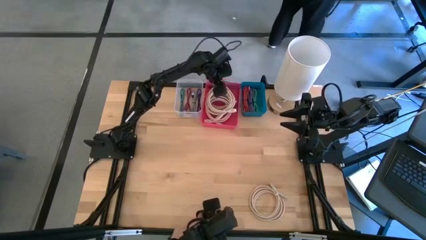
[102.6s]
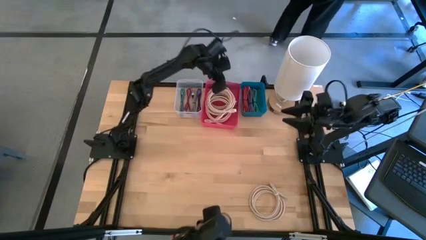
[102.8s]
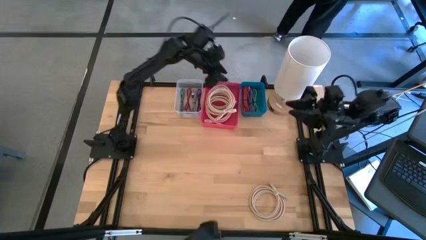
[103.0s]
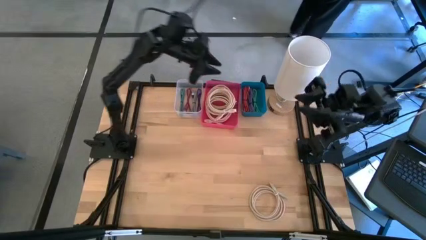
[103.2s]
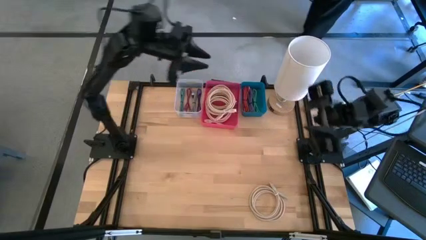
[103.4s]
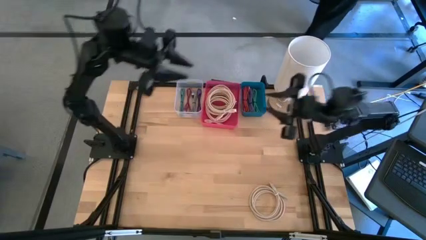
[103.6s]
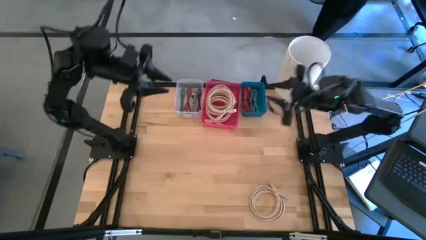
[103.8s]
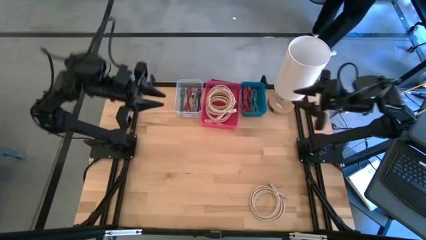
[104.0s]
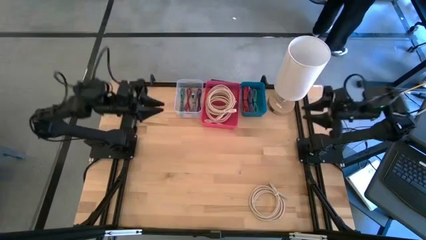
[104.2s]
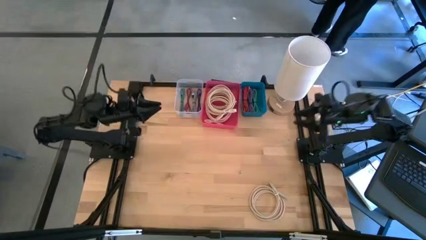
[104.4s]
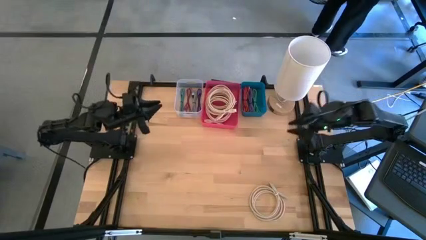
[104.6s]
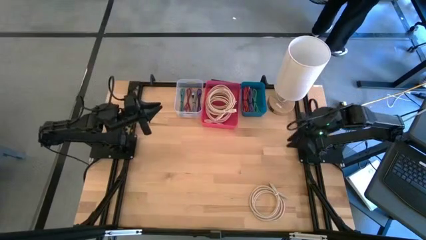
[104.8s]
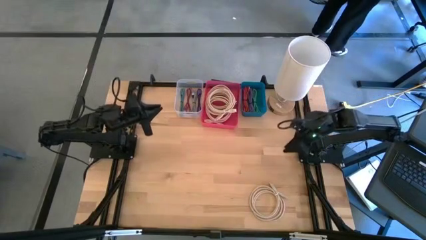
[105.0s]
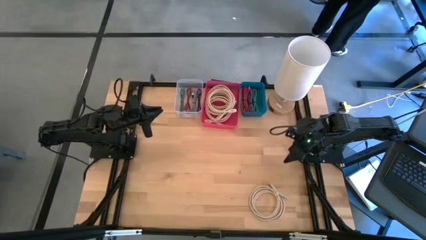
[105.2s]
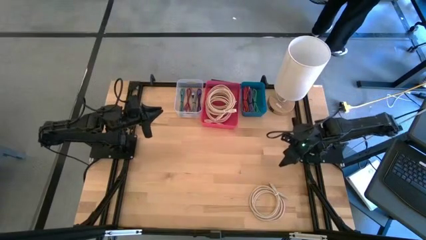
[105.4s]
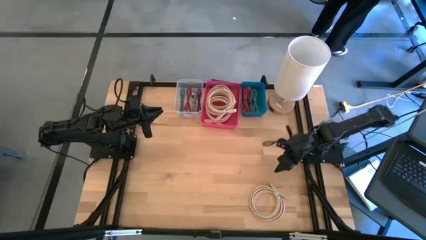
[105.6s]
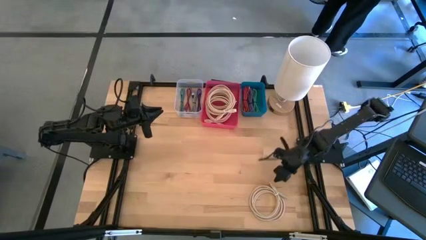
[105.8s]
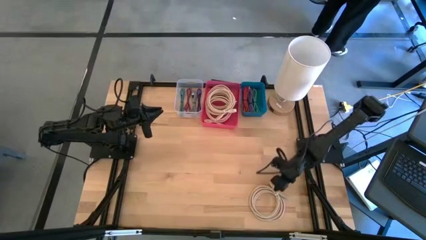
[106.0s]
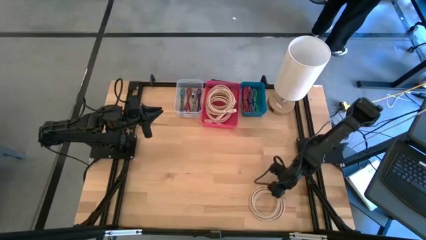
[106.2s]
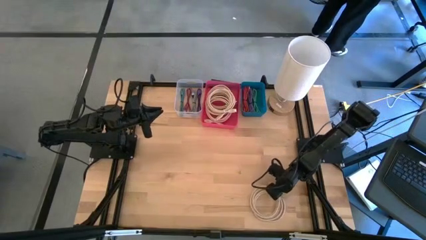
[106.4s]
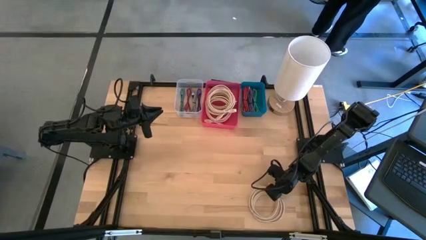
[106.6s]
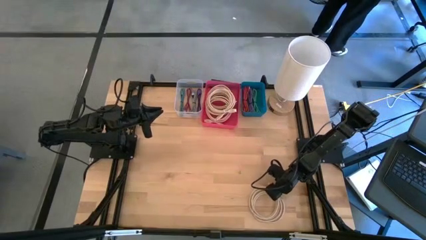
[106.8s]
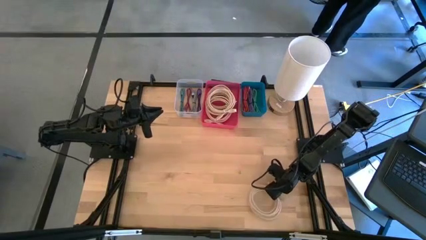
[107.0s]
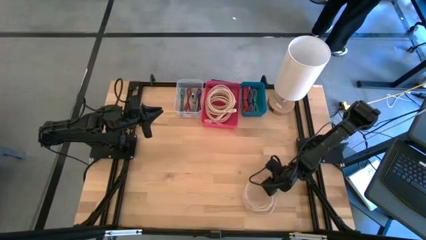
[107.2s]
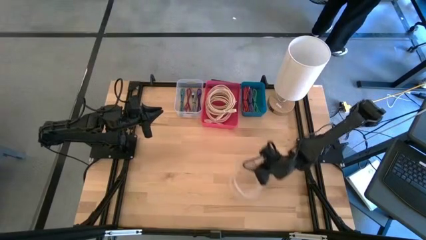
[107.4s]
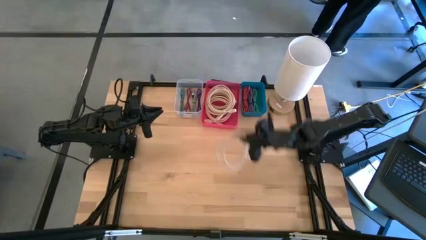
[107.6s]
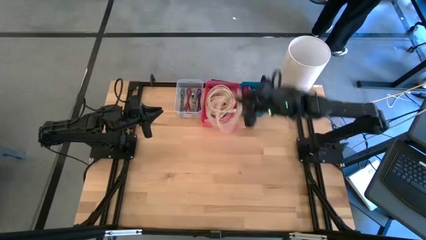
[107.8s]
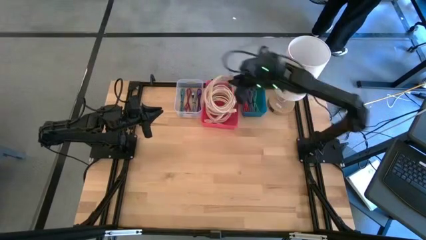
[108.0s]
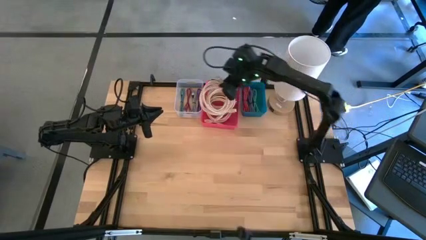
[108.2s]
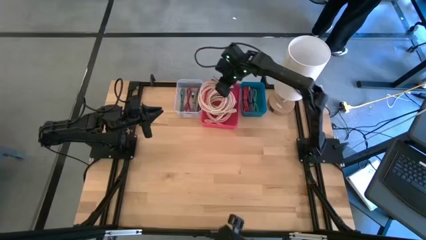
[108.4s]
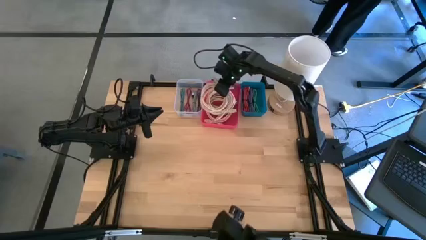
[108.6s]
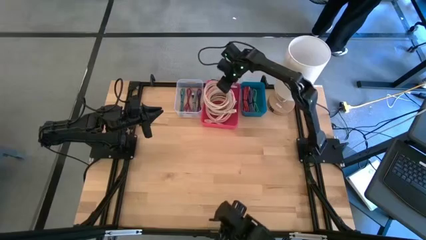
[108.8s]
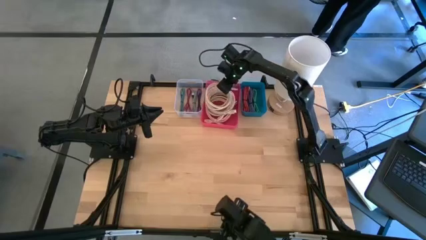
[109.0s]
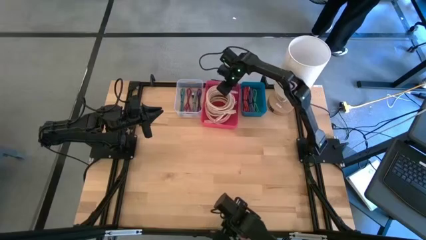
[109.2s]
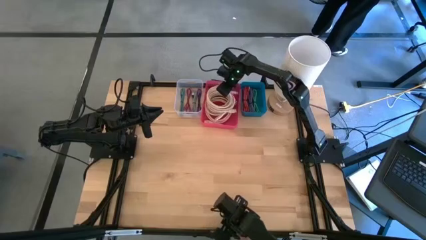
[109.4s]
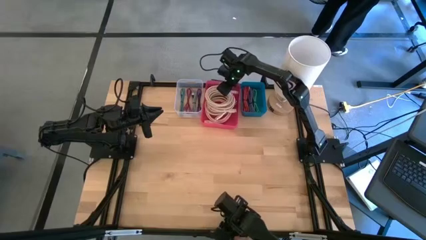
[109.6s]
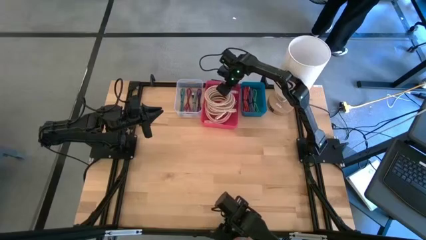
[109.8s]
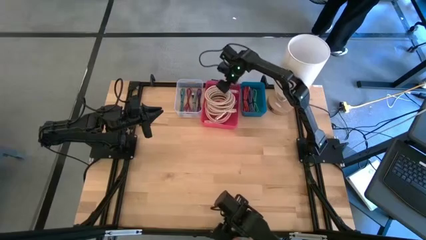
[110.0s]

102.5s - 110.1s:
Task: Pick & Place USB Port
Put the white USB cable into the red bin

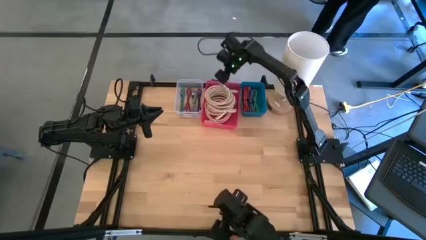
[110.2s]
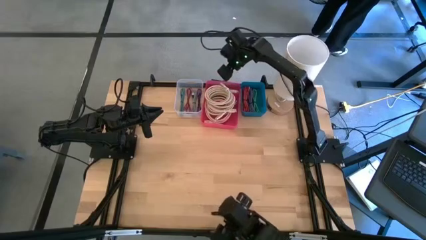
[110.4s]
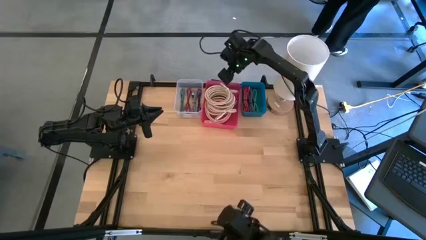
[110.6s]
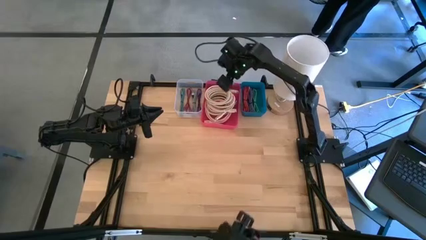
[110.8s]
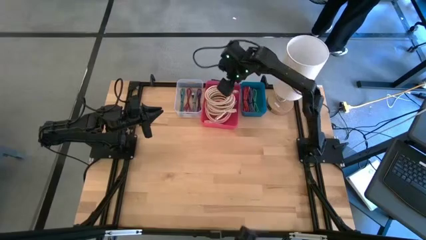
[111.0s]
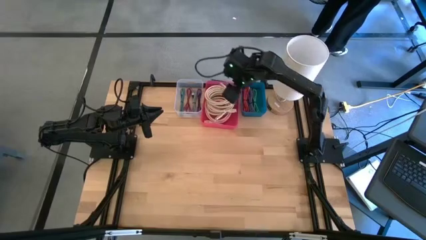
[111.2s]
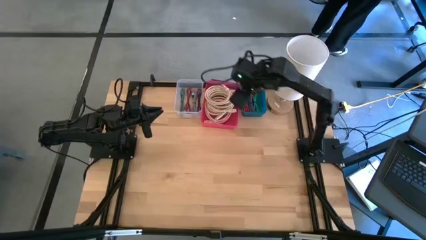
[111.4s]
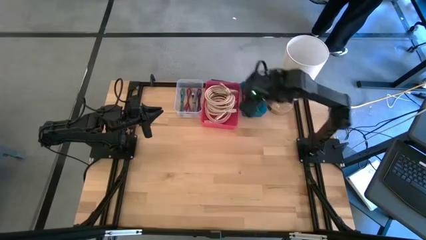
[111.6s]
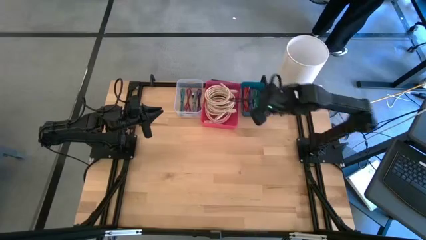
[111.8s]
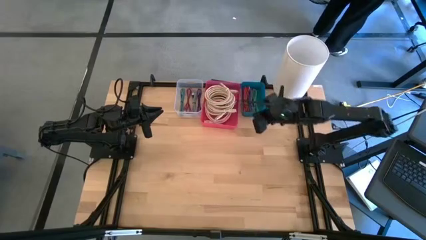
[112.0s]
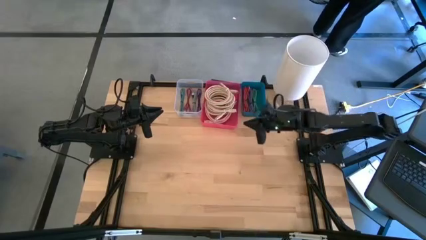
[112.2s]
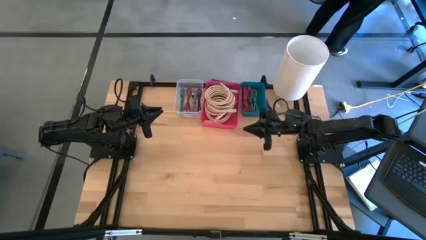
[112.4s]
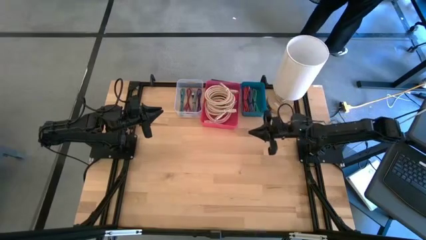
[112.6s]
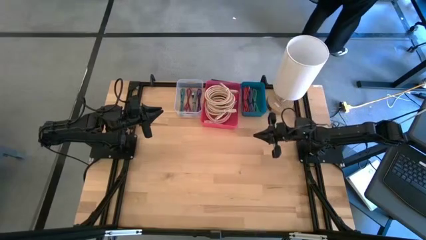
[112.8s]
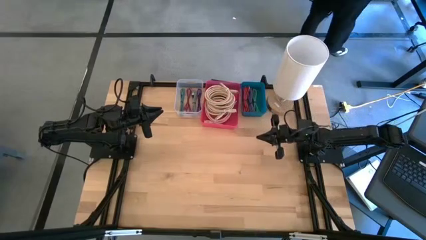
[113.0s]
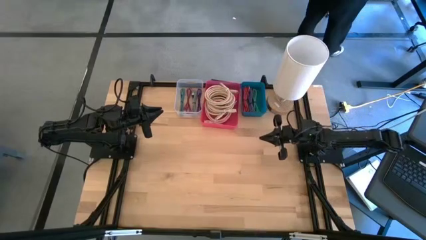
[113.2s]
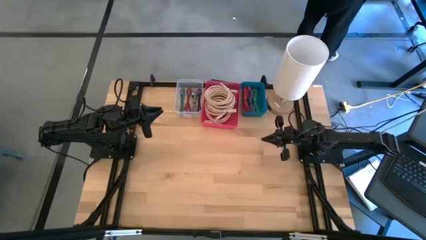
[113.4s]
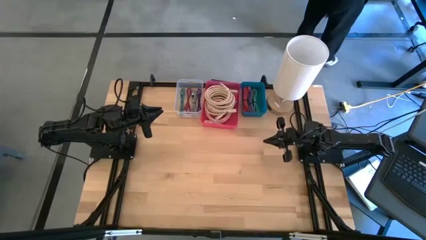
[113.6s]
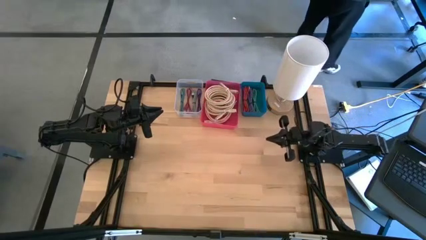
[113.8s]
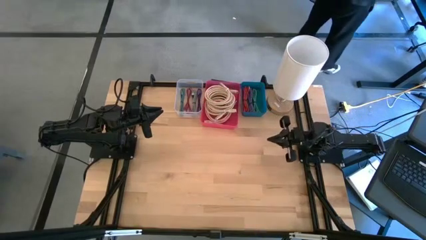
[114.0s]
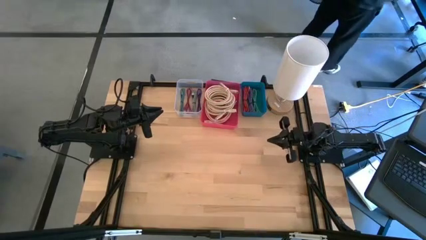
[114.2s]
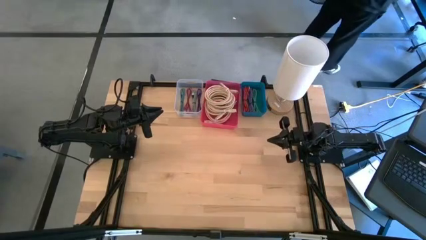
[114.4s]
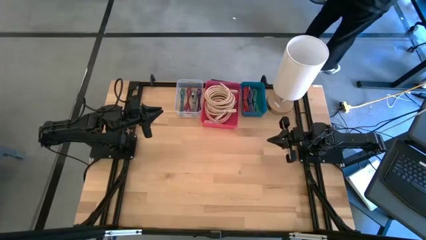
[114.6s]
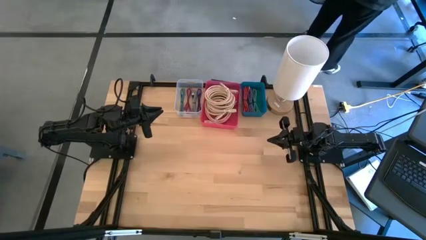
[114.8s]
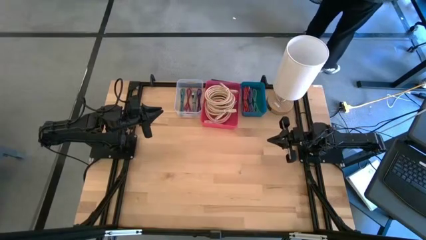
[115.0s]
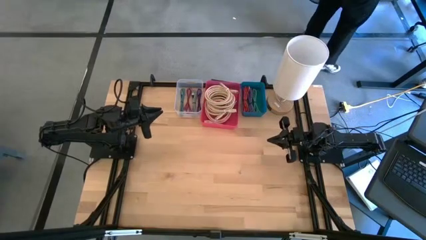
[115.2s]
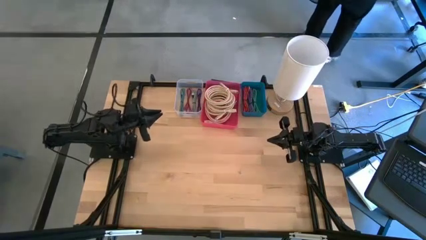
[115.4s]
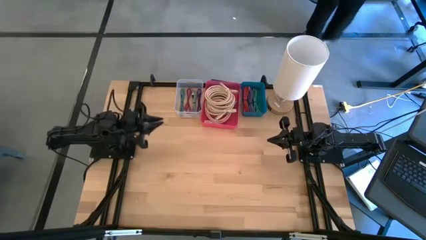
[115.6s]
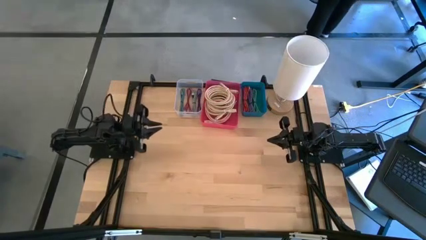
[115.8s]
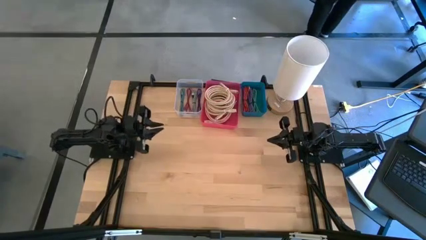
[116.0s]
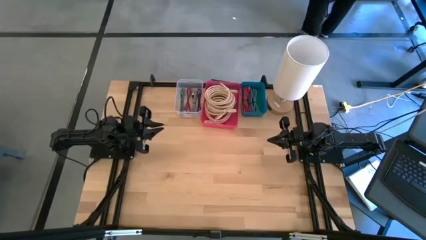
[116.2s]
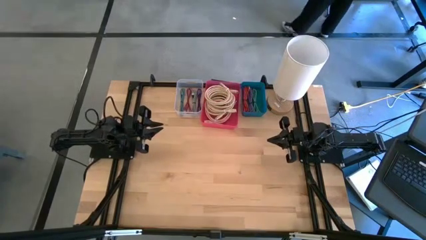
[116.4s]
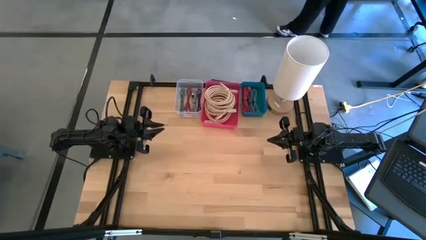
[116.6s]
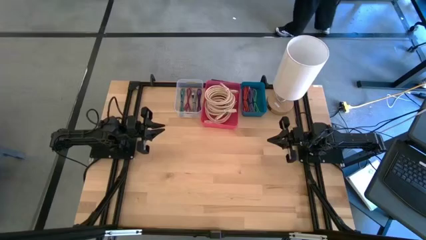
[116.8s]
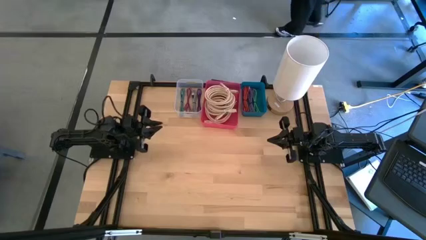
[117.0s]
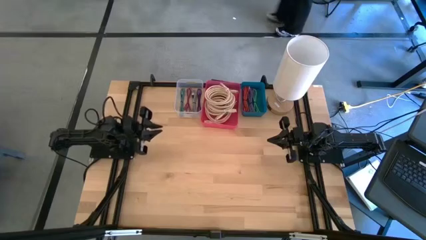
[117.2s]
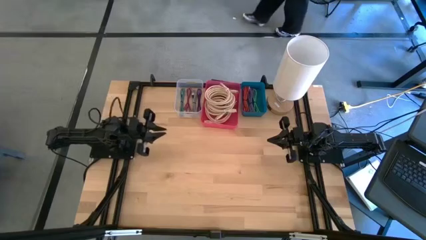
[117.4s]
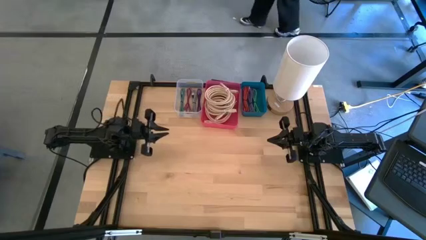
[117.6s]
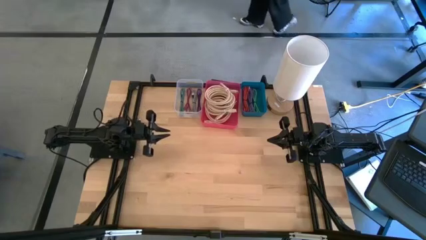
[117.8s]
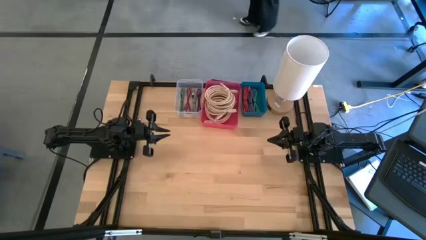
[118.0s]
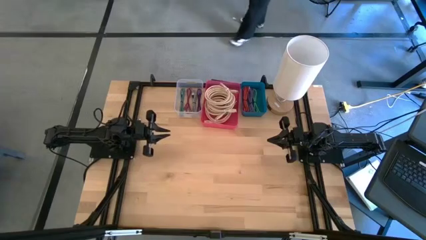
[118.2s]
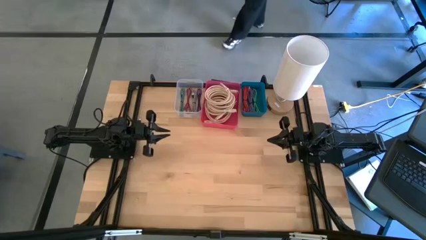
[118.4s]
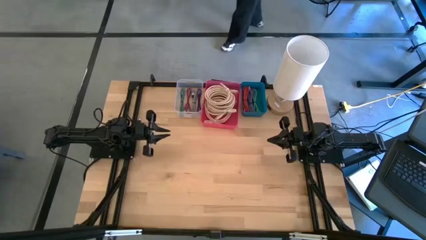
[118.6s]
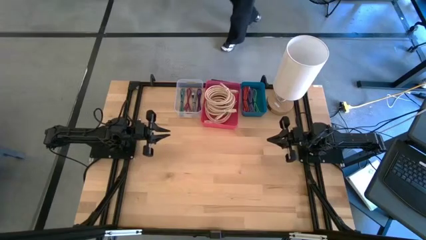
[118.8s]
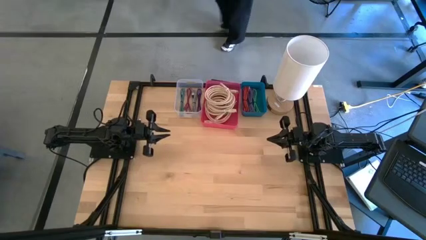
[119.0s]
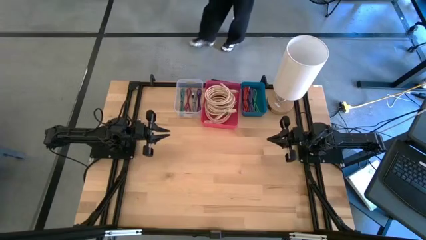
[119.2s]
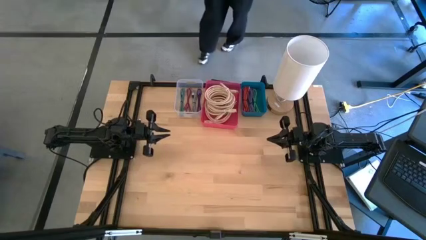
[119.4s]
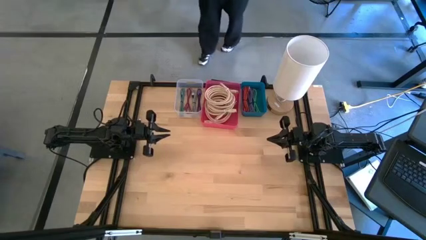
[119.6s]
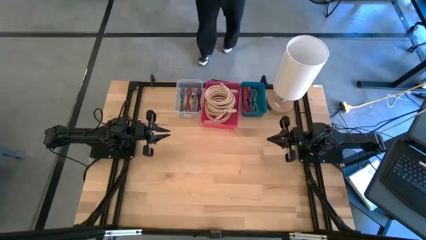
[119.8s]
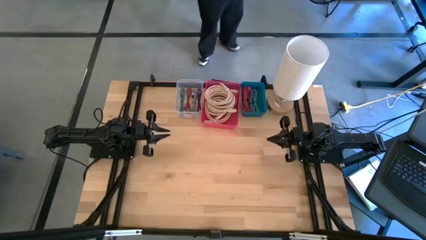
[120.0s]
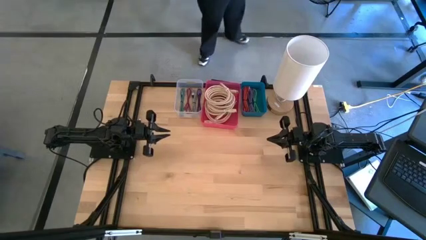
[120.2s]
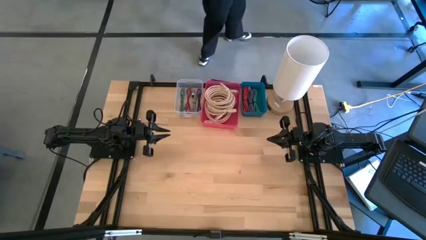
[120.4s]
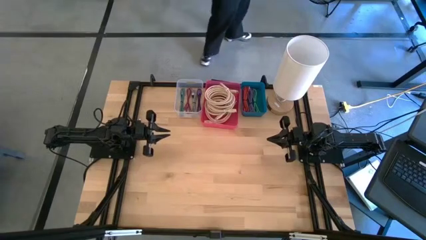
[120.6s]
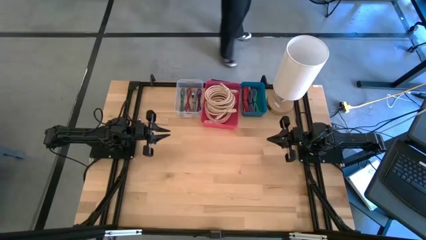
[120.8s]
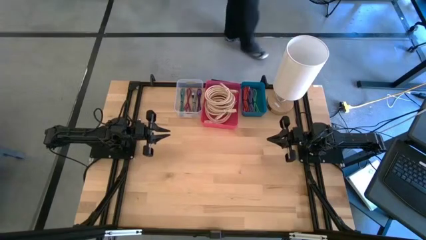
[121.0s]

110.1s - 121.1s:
Return to Home Position
